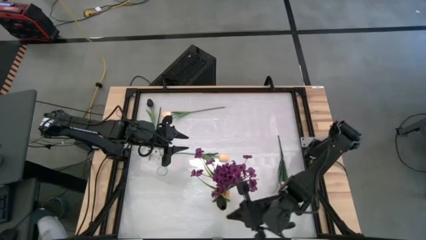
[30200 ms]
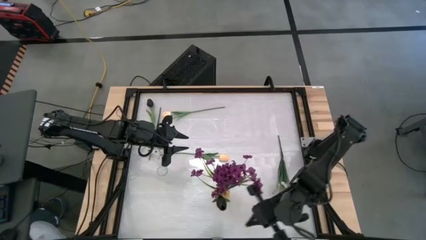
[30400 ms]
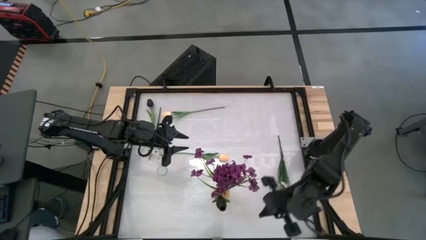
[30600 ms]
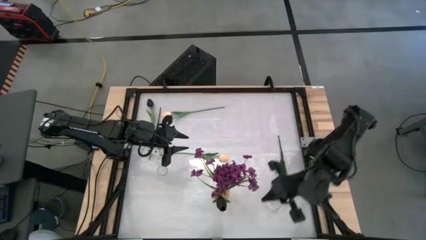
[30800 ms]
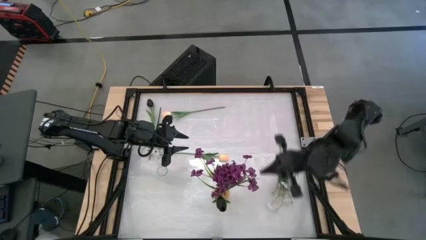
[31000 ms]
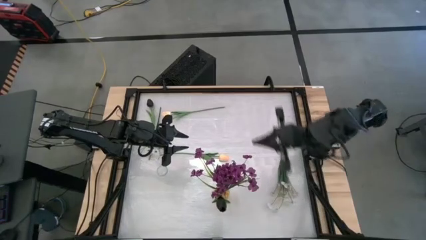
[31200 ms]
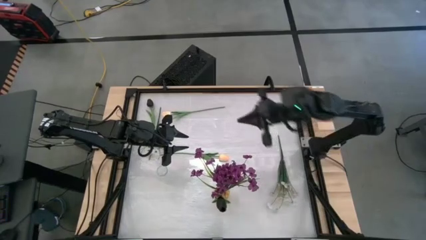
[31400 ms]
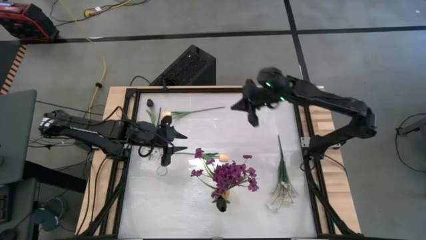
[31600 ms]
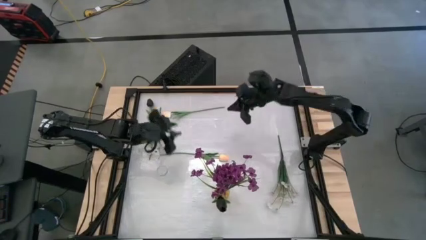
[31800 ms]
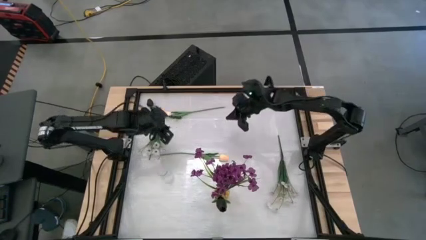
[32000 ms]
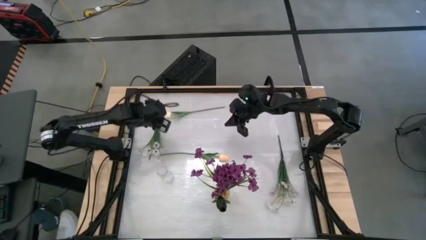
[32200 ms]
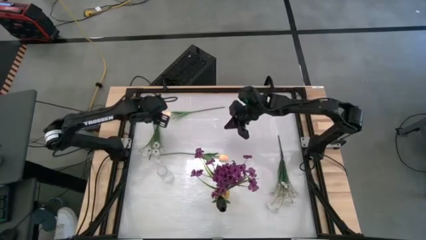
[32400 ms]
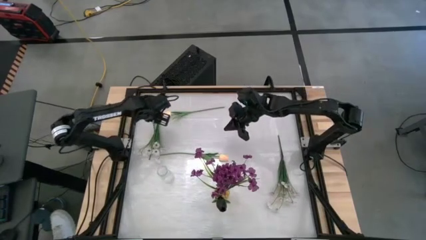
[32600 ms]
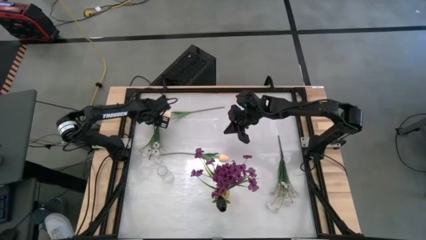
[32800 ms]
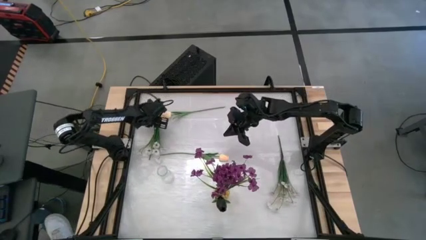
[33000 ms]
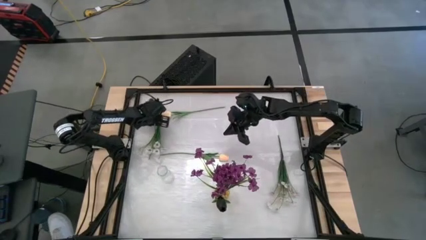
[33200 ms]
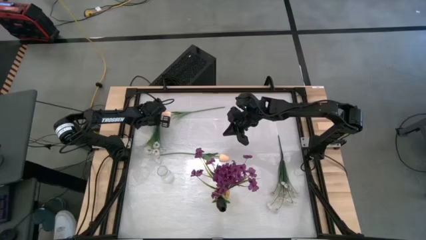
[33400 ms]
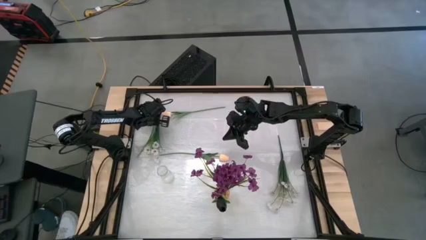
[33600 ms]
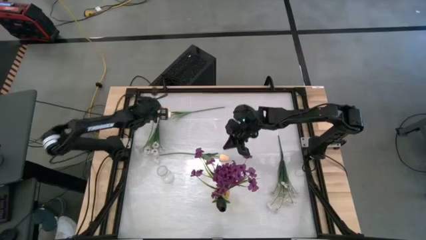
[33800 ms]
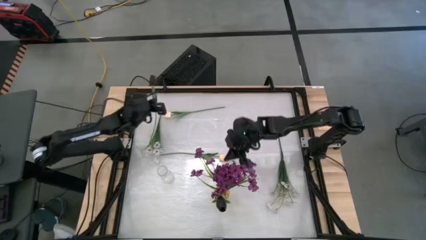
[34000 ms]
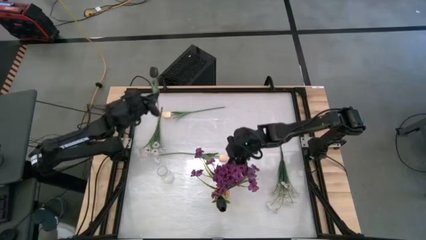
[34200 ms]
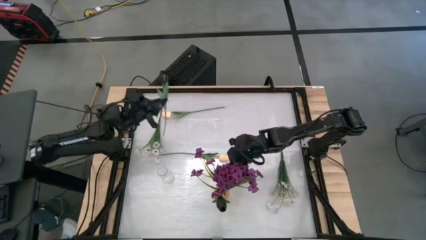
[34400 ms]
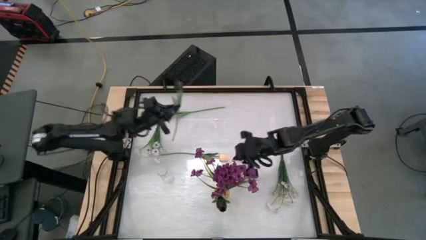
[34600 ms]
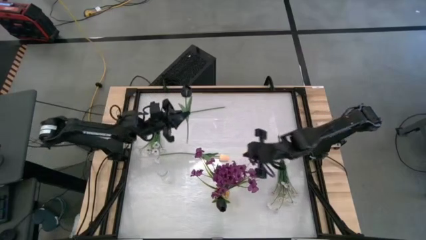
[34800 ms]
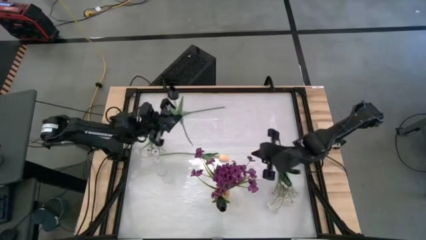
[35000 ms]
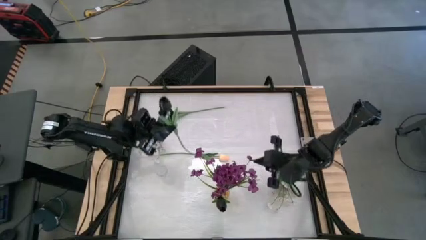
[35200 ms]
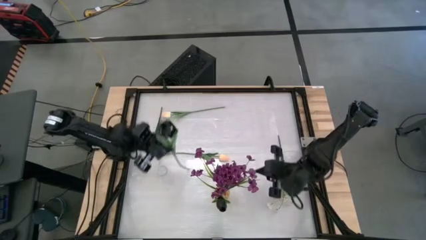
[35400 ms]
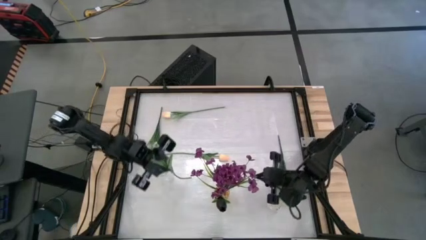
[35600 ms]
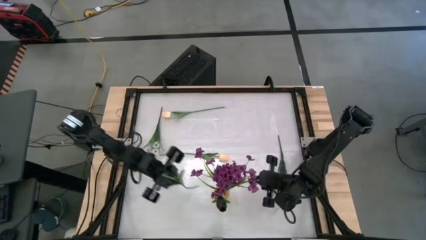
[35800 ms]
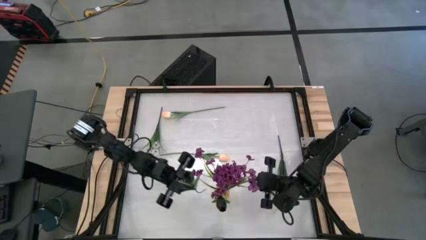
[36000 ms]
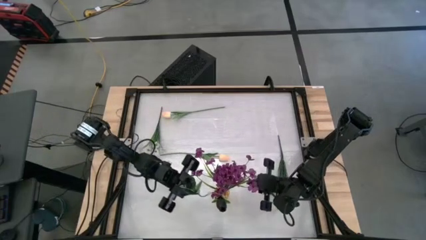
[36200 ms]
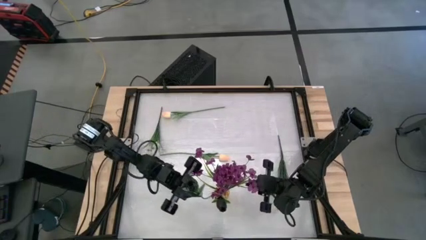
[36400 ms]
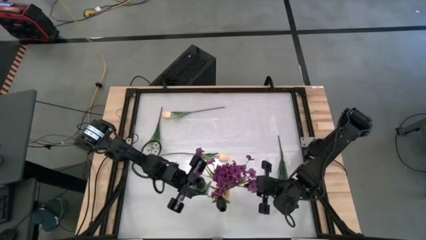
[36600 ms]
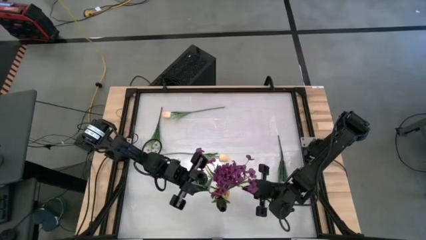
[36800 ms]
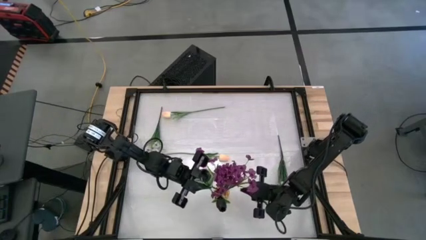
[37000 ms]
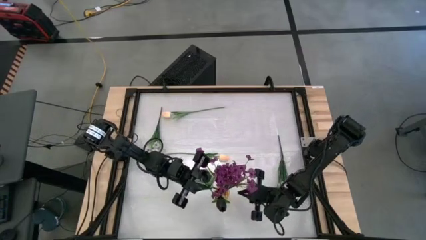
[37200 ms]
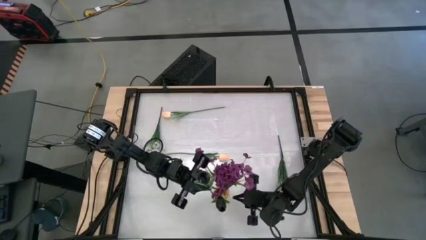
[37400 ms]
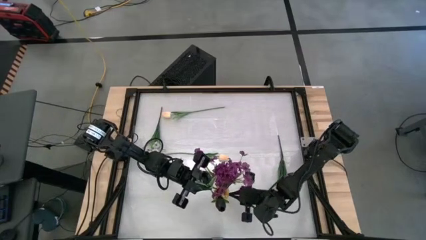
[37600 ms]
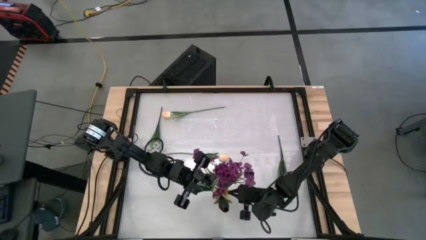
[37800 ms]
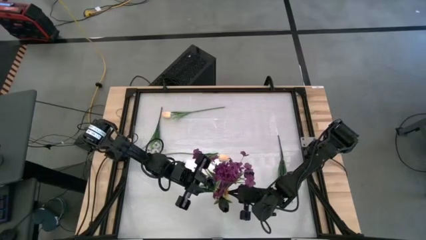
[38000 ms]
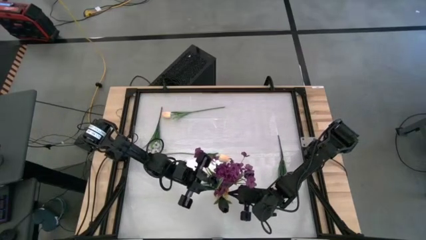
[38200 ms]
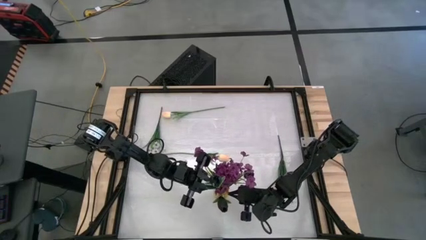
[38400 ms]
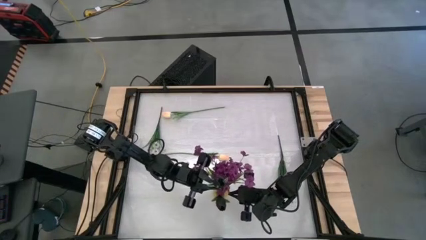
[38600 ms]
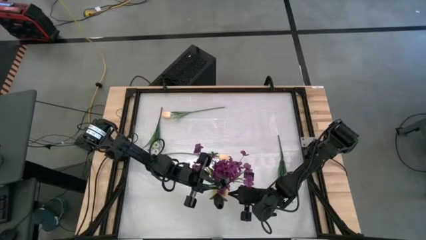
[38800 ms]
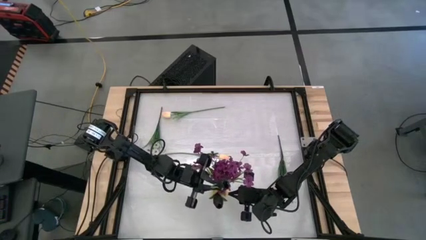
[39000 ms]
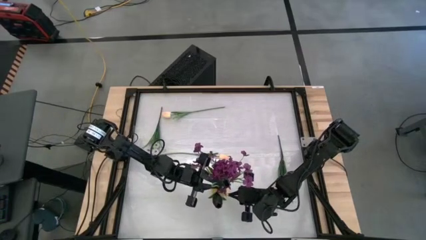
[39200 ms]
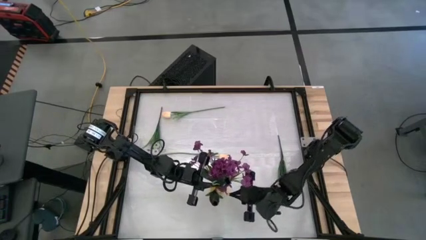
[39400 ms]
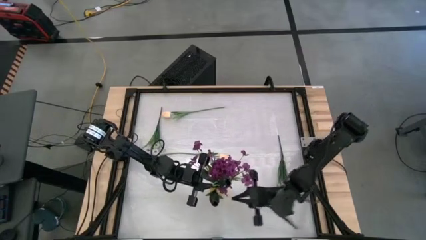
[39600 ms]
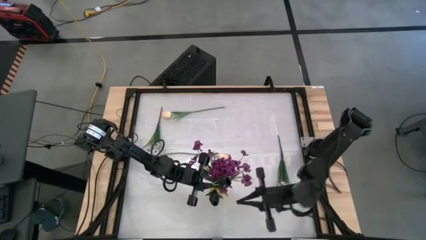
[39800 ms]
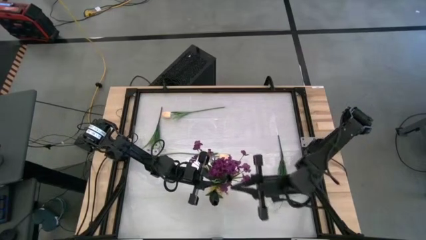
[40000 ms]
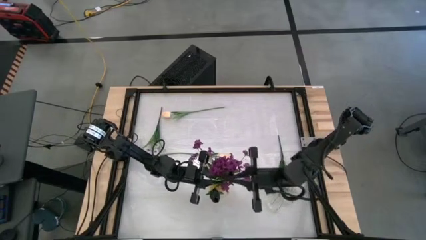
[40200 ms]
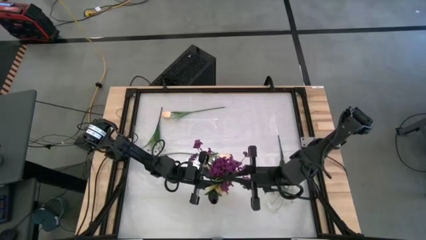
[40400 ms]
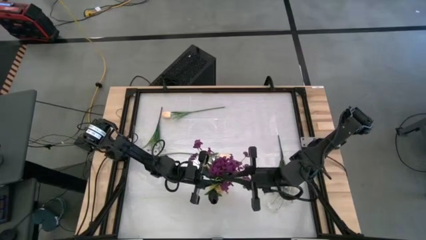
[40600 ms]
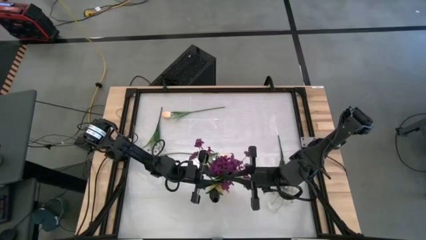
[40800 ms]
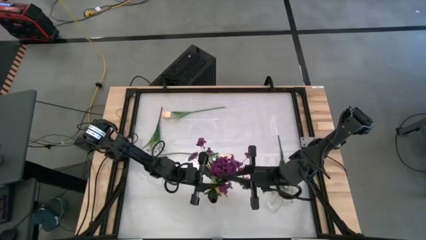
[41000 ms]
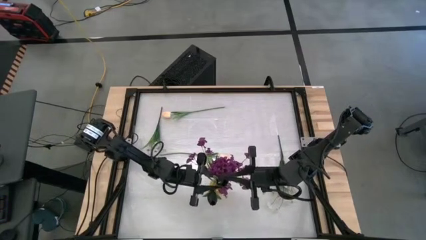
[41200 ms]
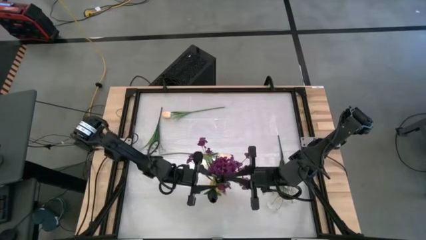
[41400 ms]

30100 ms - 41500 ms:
Task: Sort flowers into vase by color
Put the black flower into the yellow vase

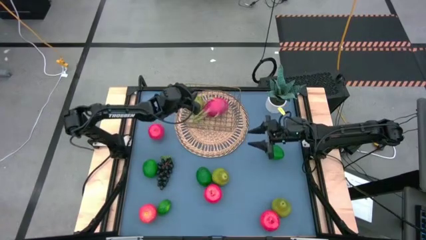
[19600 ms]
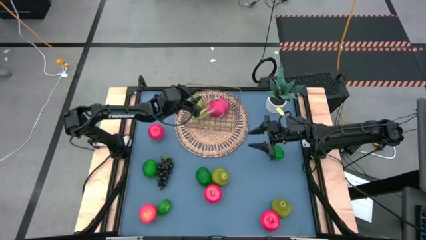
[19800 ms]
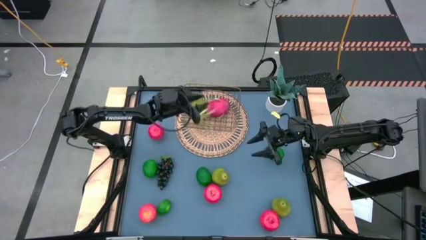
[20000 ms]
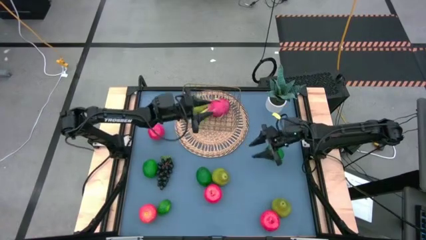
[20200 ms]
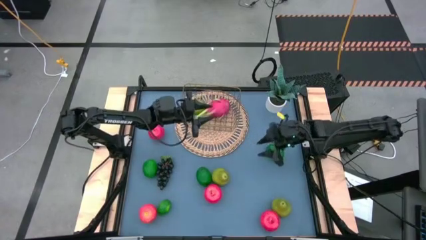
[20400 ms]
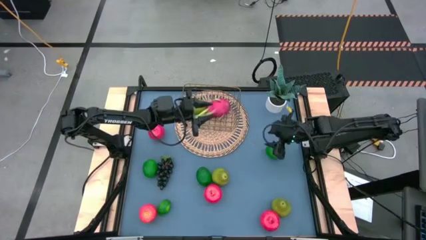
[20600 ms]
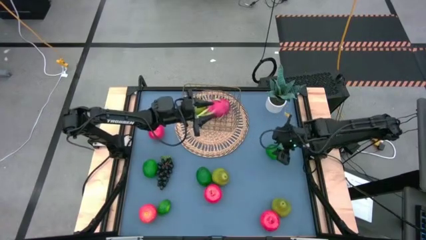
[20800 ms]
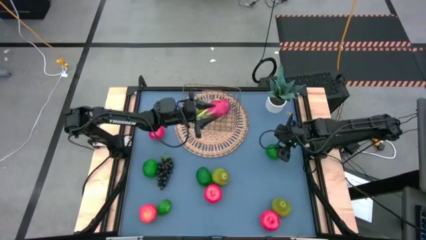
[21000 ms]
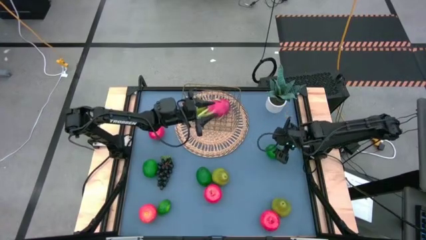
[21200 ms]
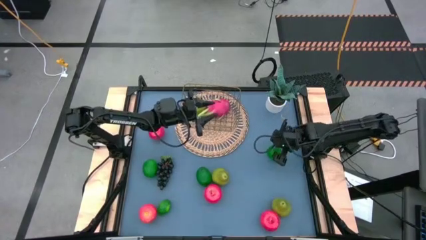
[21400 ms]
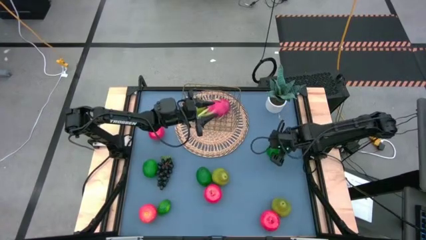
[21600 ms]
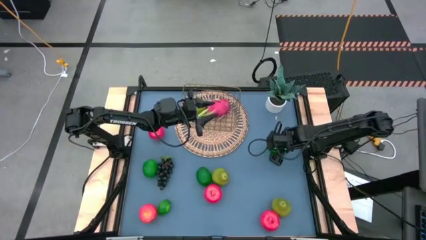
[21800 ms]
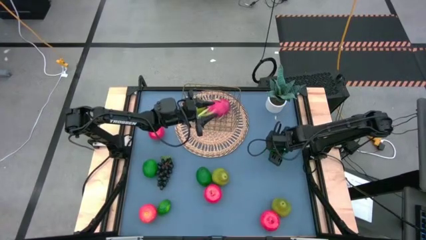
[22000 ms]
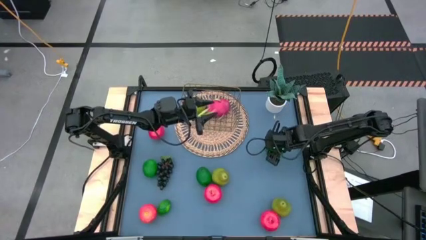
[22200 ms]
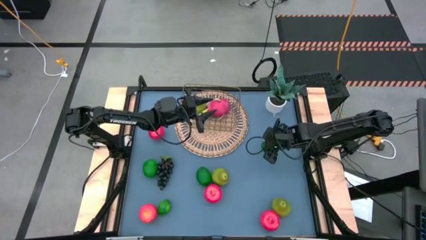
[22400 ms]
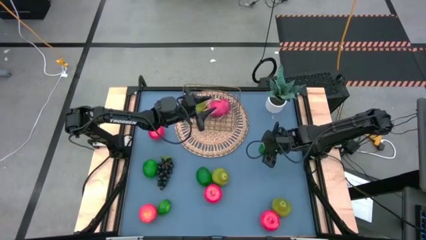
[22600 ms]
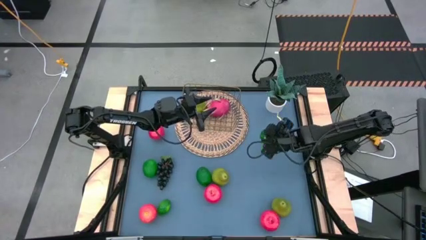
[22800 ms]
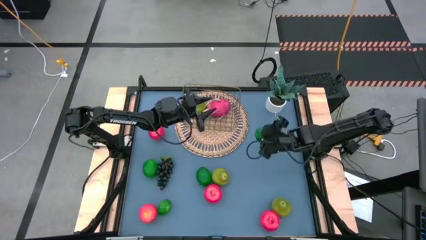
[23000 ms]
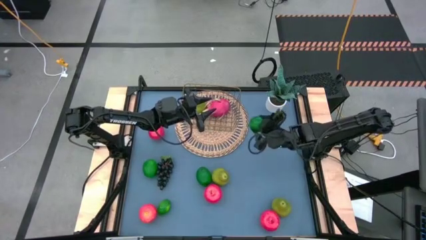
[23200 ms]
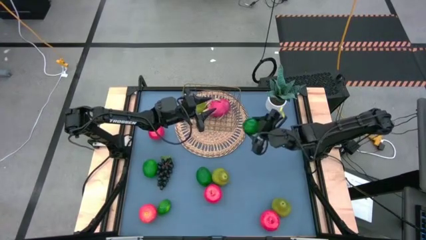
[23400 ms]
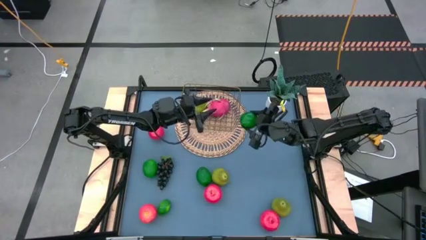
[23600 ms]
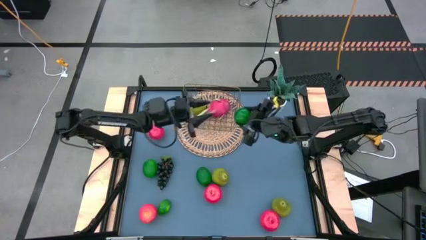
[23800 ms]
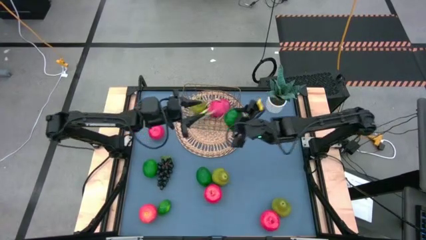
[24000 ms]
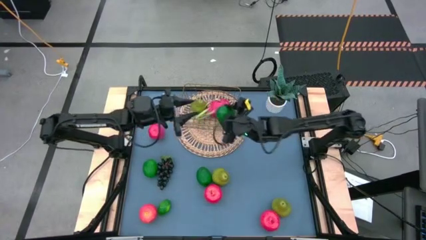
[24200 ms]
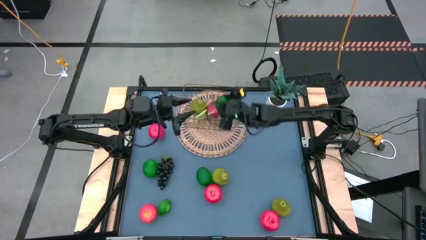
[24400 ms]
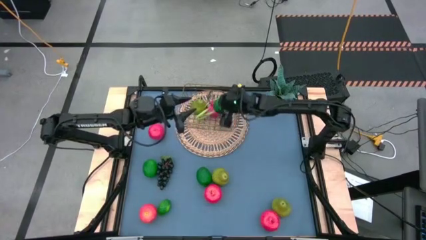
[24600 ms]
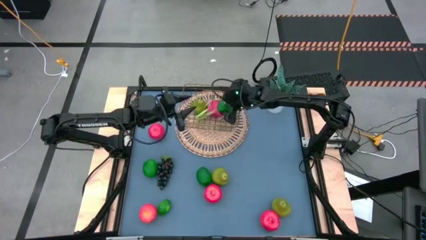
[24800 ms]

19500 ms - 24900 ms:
Task: Build produce basket
Put the green lime into the gold wire basket
